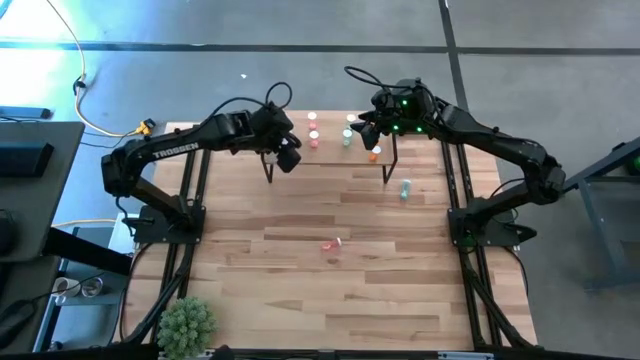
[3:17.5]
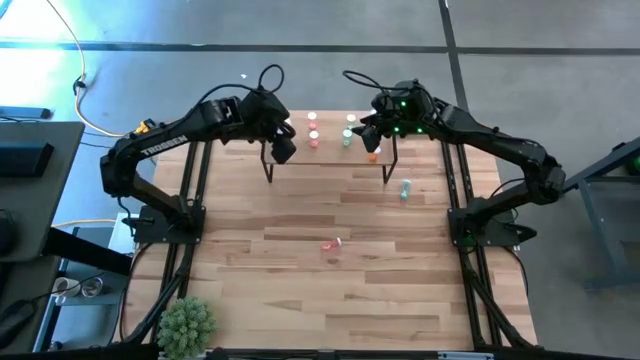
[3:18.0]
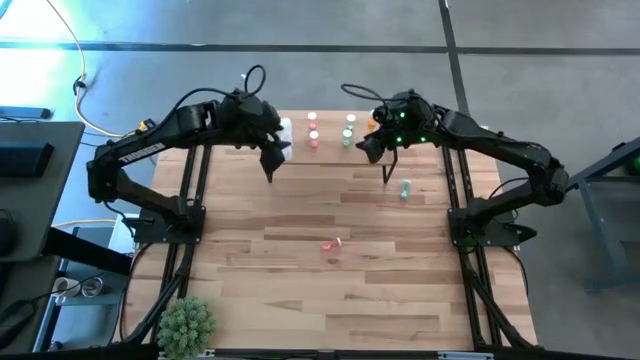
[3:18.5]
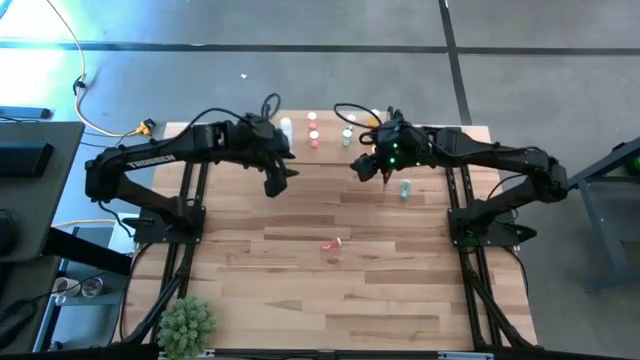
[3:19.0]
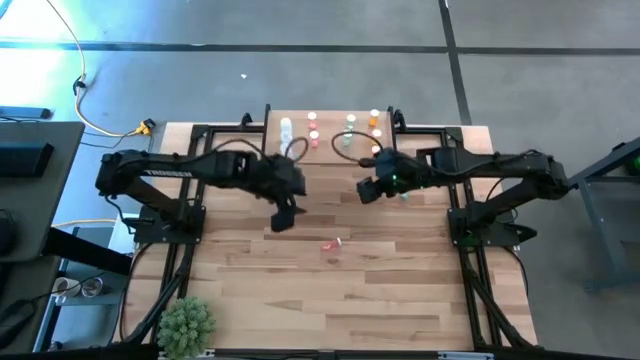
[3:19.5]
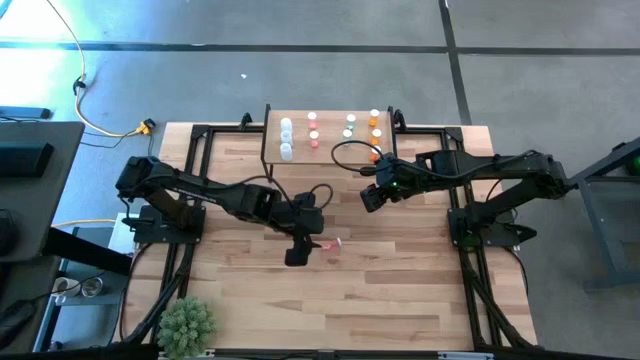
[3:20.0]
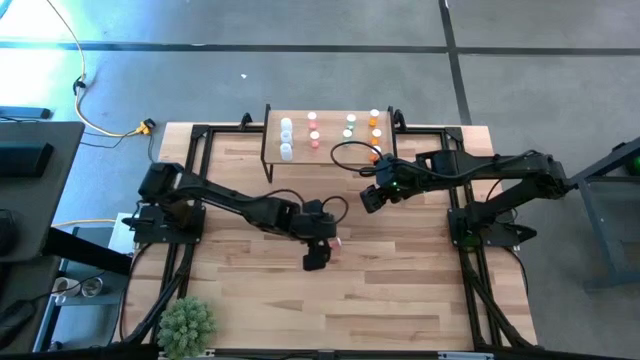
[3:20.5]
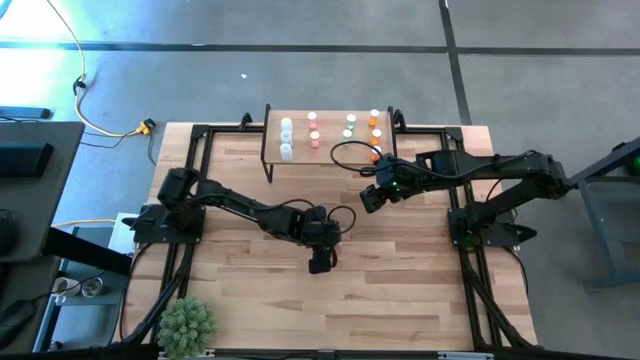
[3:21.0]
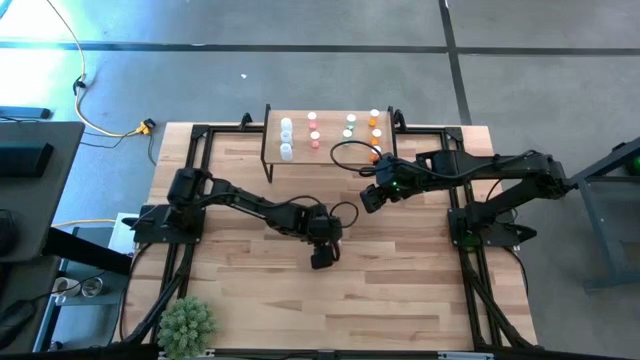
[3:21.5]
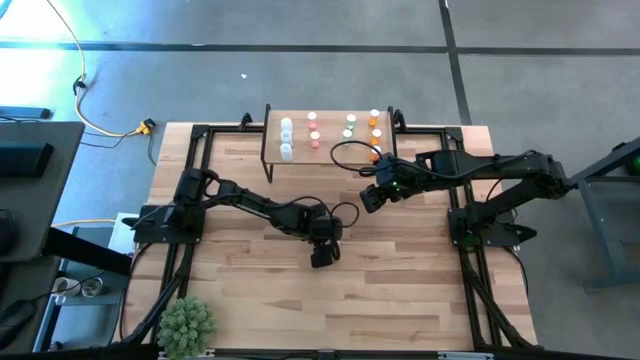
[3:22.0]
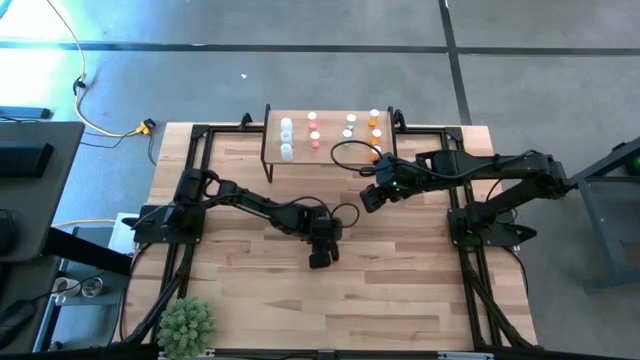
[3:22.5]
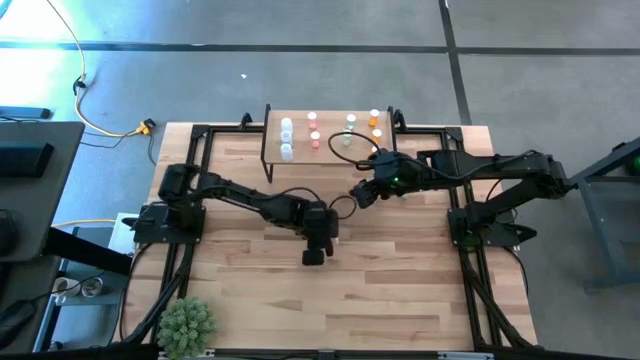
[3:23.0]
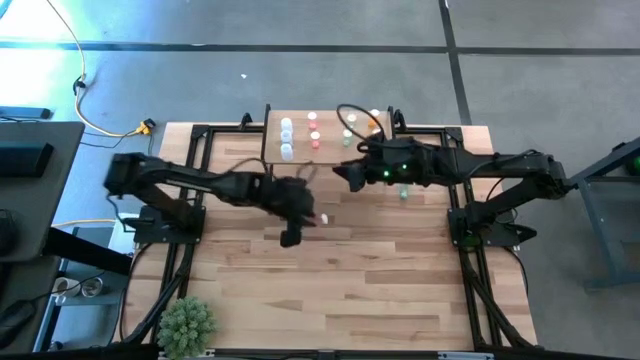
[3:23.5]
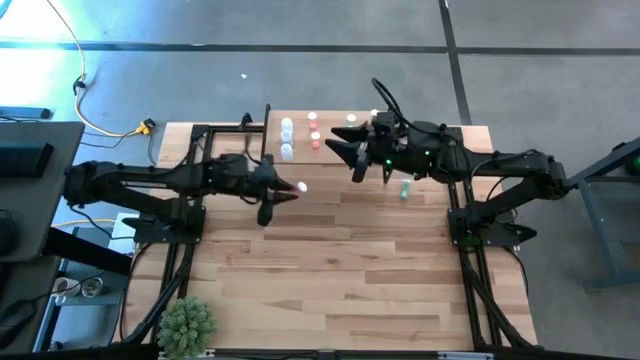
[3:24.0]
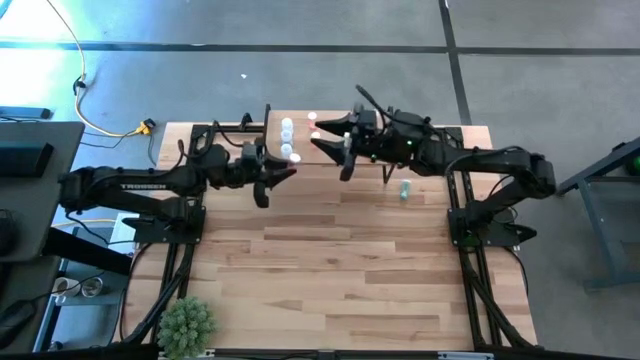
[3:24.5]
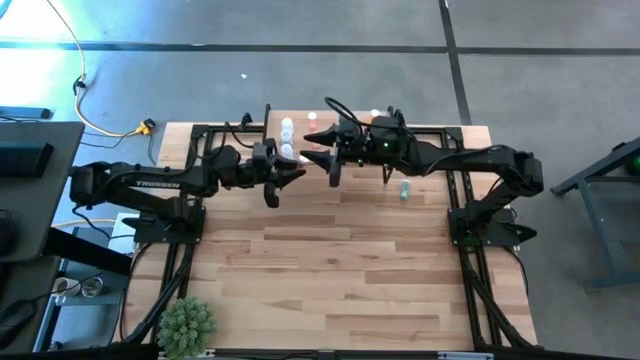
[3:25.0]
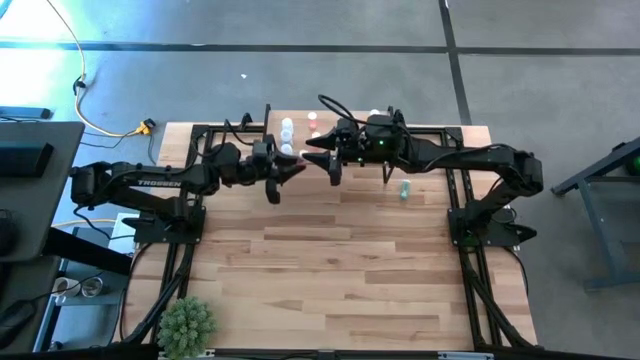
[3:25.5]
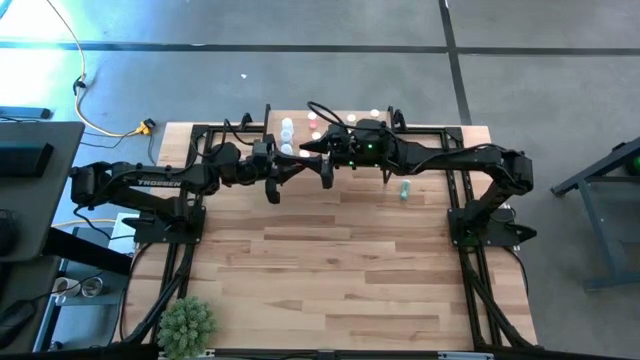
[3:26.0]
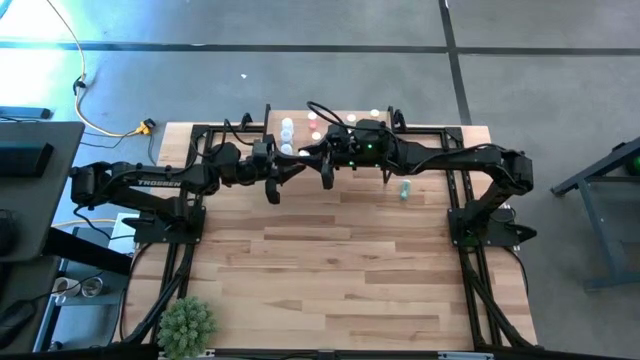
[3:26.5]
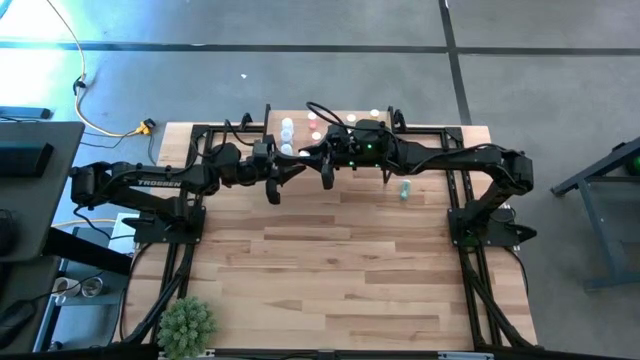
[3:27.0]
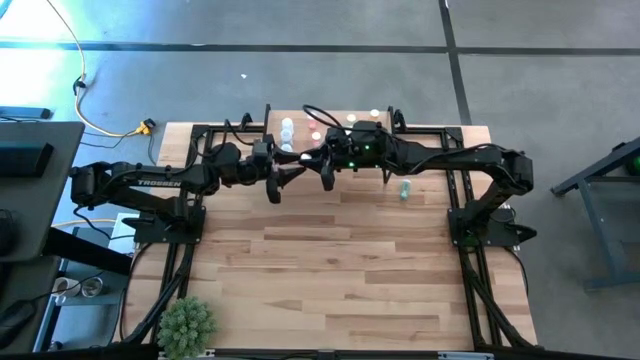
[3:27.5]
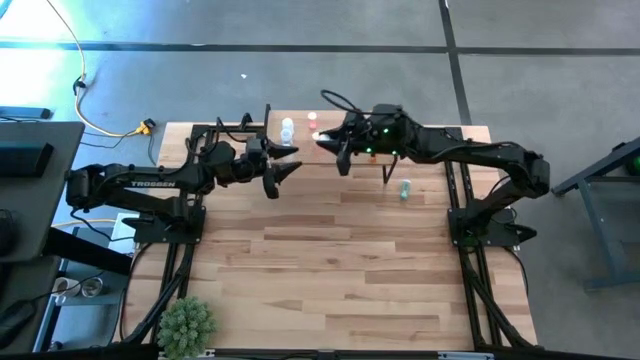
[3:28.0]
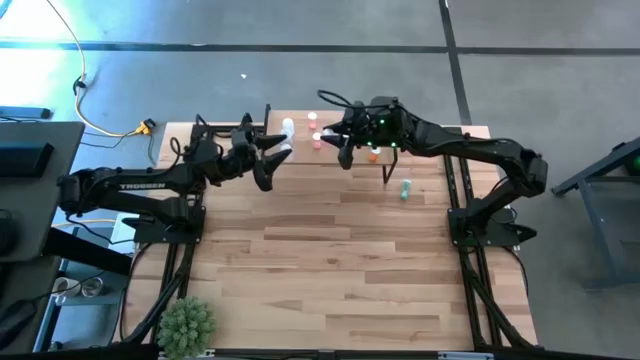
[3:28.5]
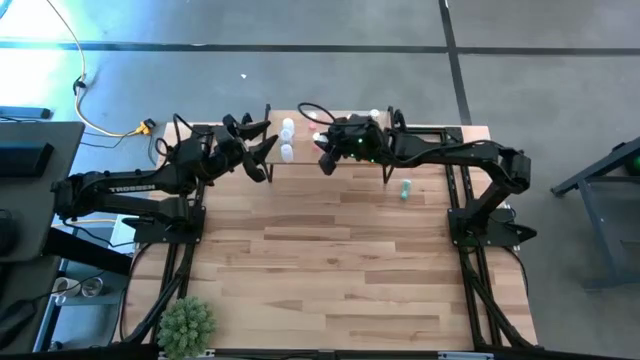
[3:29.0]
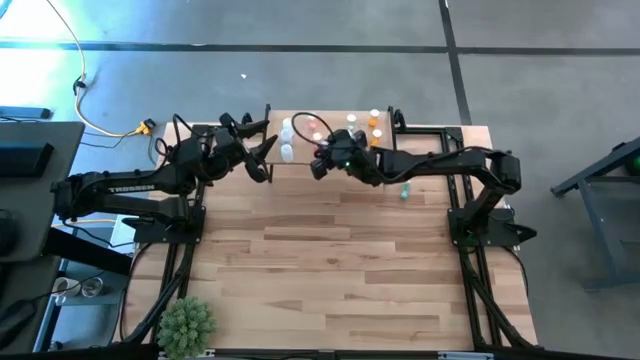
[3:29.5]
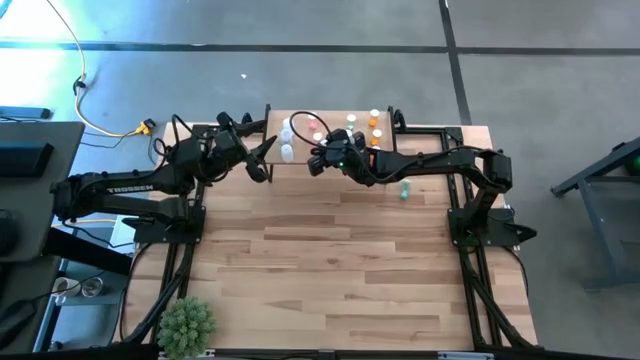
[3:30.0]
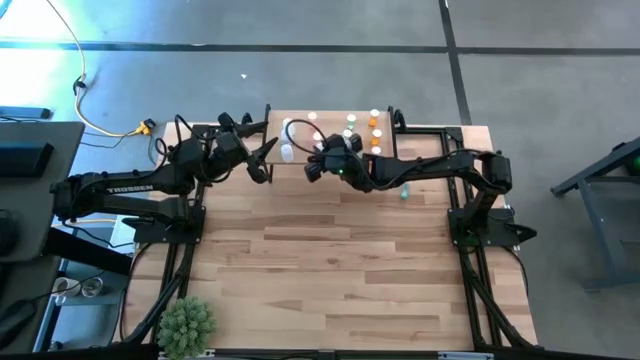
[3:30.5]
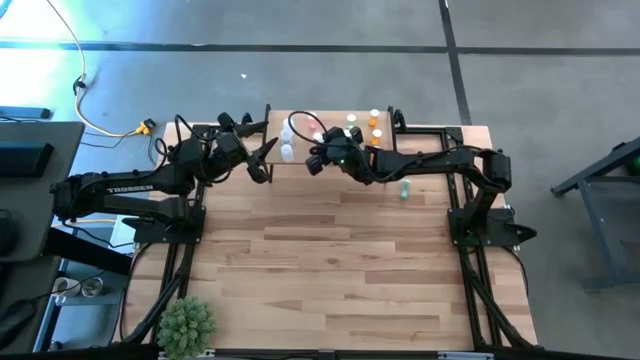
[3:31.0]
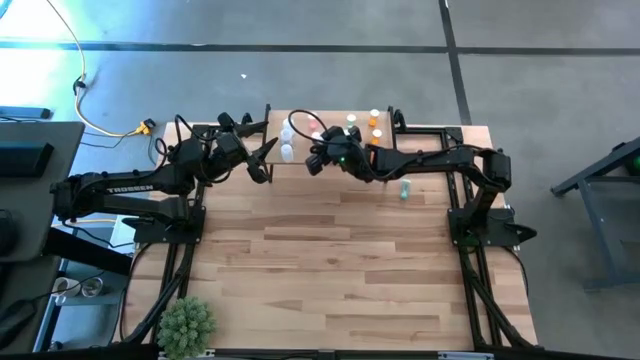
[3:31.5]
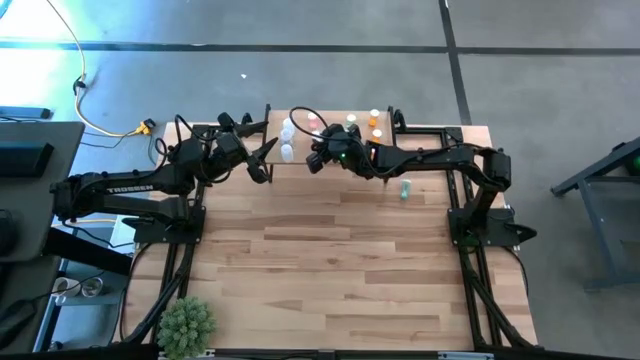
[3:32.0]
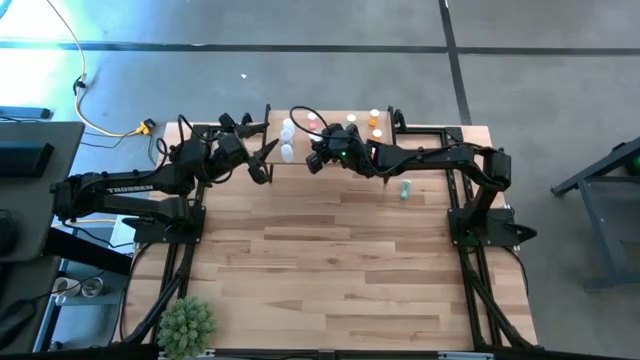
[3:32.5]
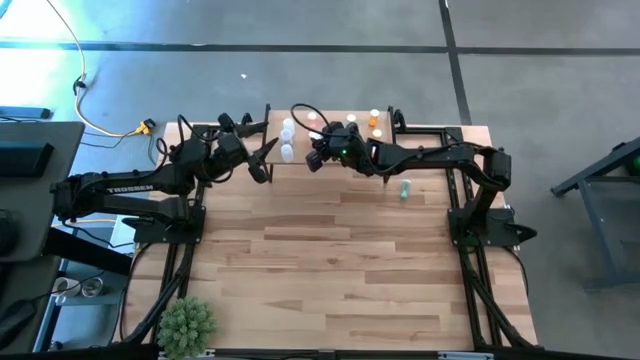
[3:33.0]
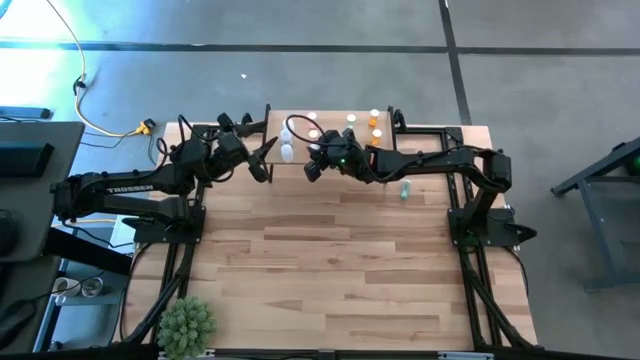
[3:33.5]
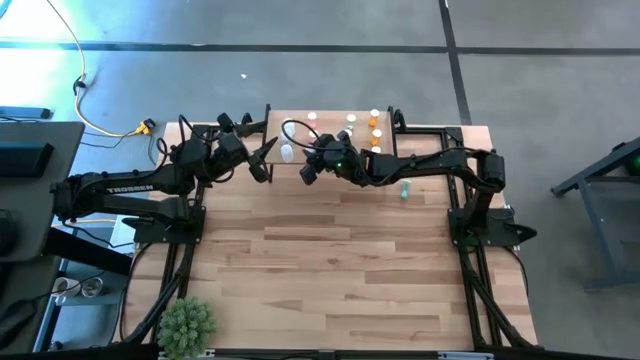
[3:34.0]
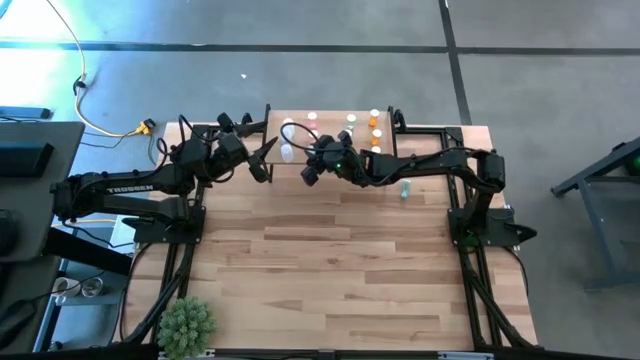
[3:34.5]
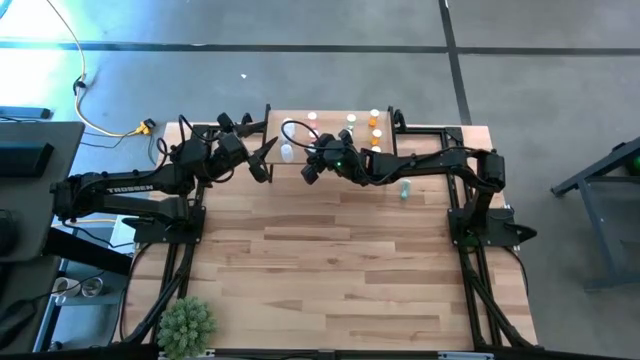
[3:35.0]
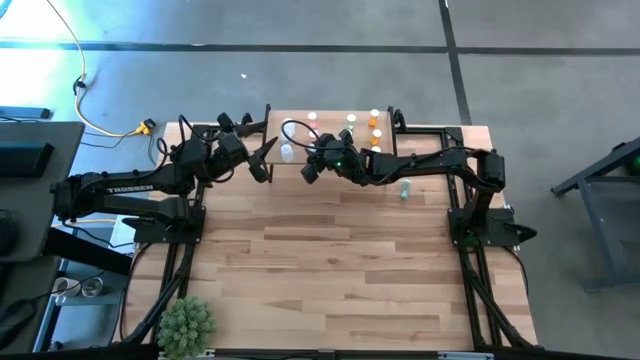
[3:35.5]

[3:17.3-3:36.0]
Task: Pick and place medicine bottles onto shelf by color
Put the pink pill bottle on the shelf aligned with the other pink pill bottles

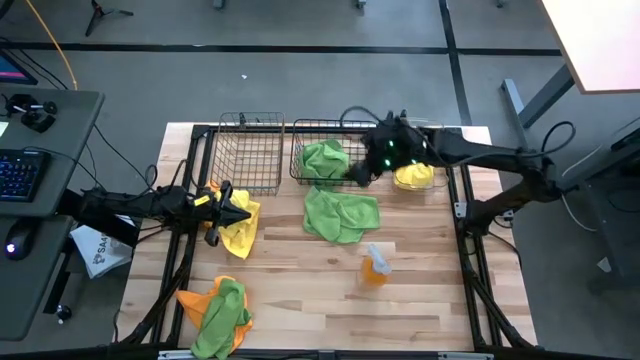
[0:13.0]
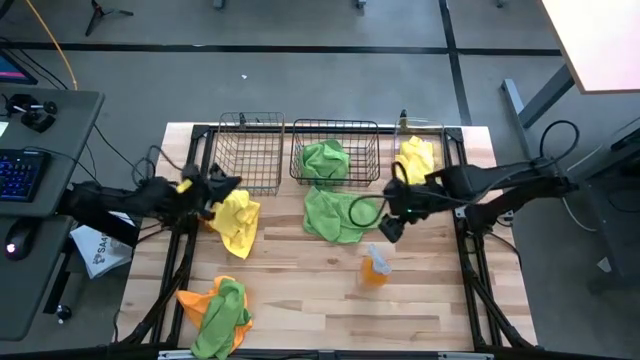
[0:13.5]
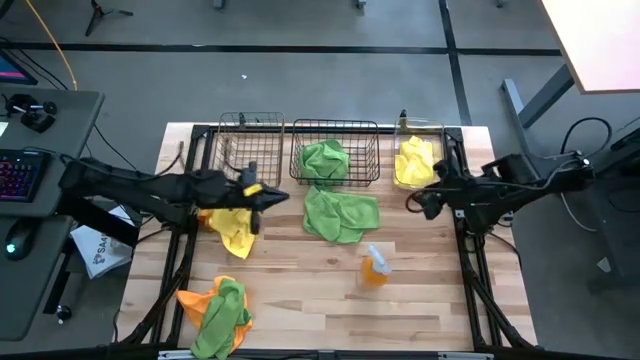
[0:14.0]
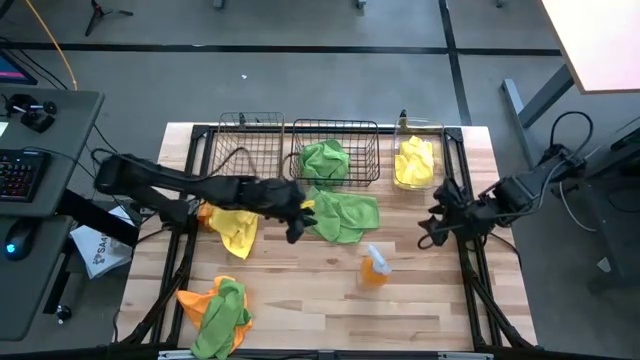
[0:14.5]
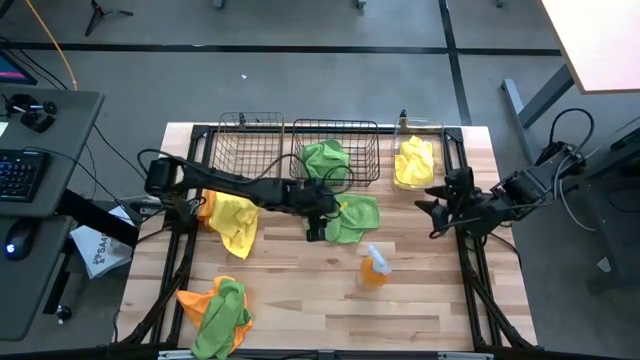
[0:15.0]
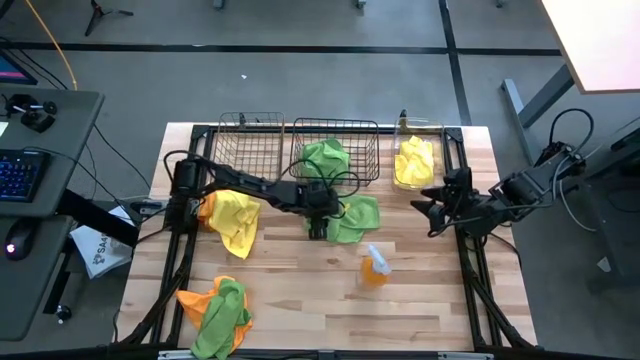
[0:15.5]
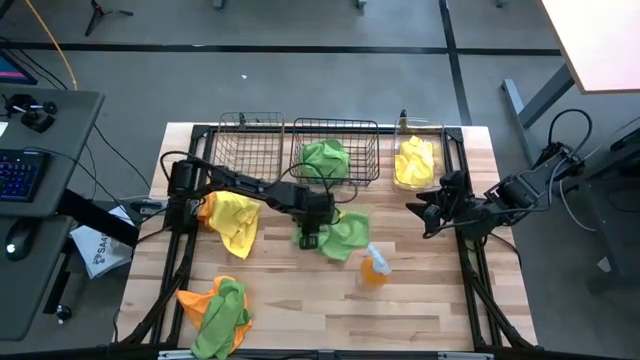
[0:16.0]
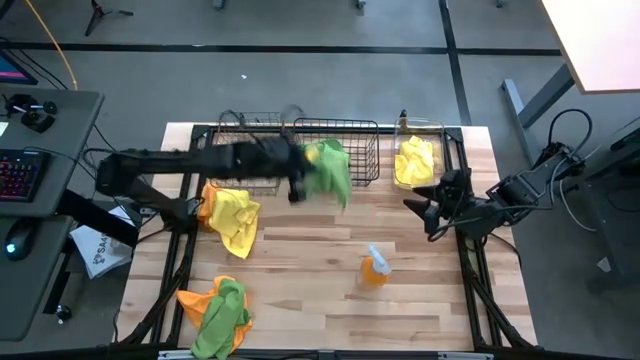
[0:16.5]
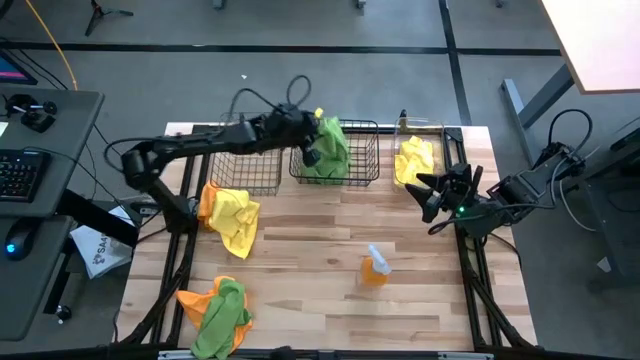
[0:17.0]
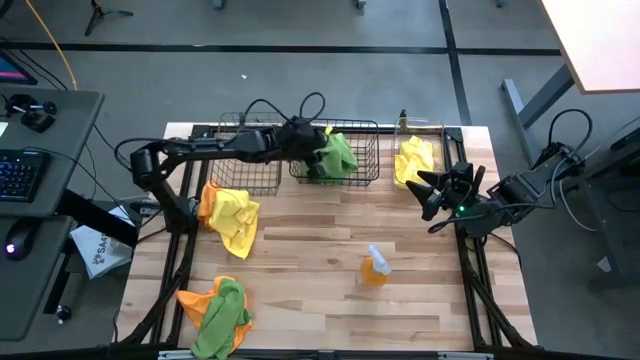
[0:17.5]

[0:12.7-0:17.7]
Task: Sort microfiber towel by color & place in baskets
Put the top green microfiber towel into the black wire basket
